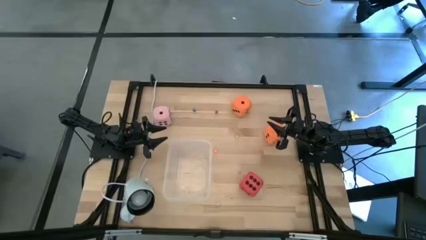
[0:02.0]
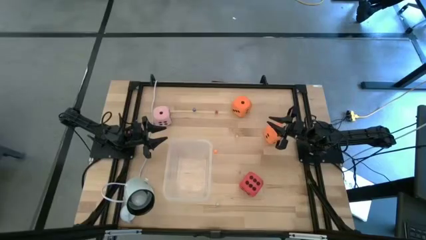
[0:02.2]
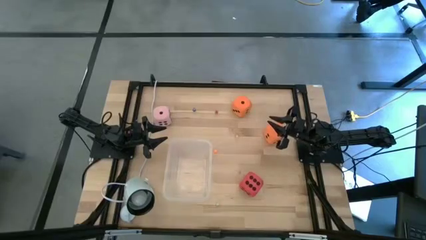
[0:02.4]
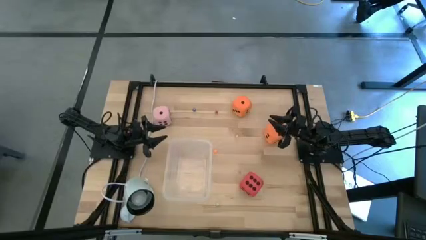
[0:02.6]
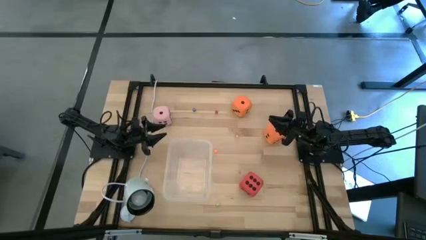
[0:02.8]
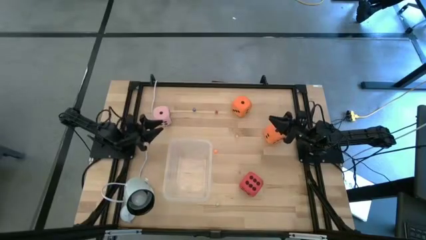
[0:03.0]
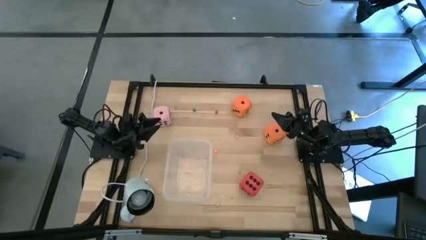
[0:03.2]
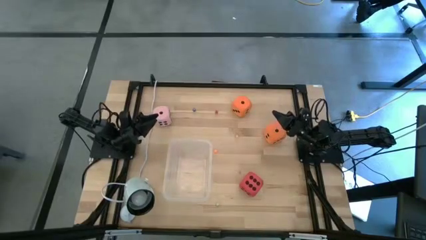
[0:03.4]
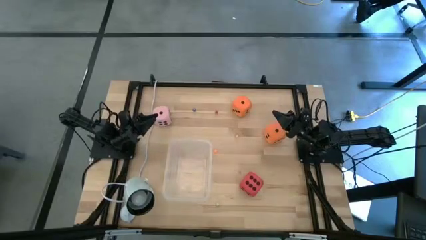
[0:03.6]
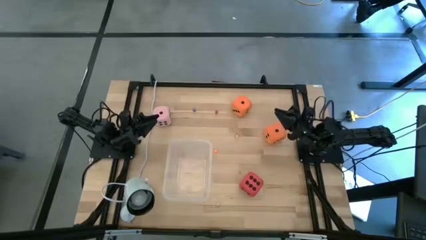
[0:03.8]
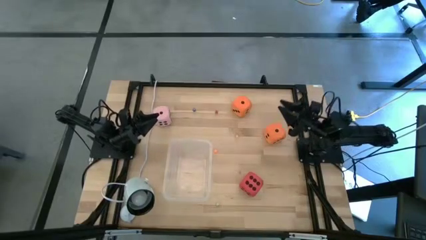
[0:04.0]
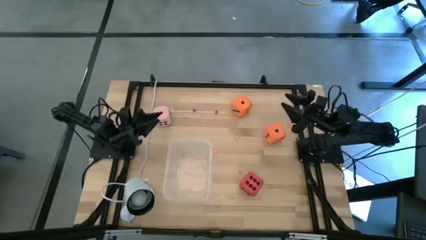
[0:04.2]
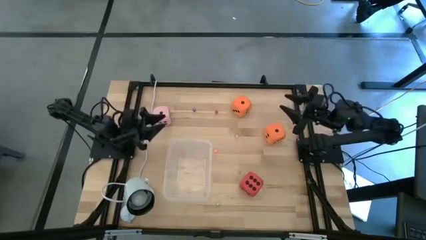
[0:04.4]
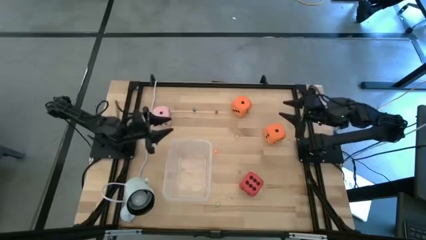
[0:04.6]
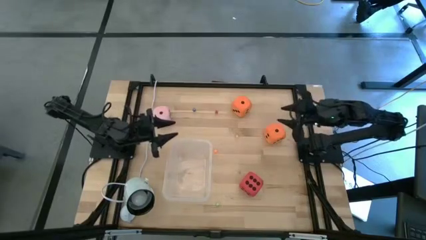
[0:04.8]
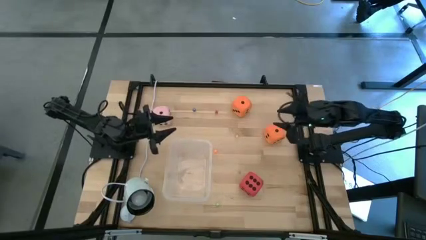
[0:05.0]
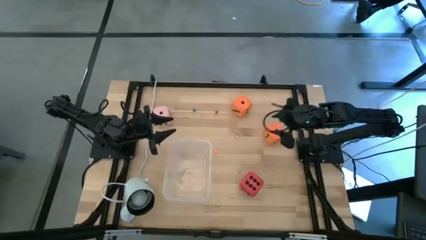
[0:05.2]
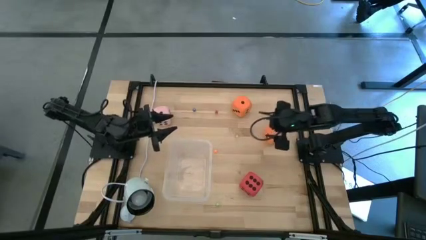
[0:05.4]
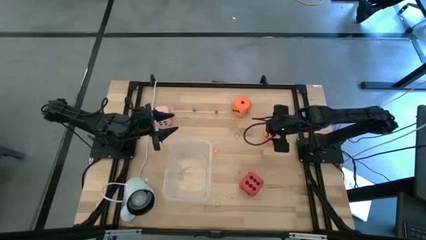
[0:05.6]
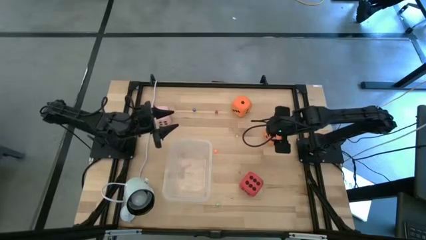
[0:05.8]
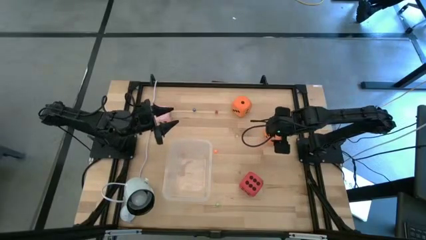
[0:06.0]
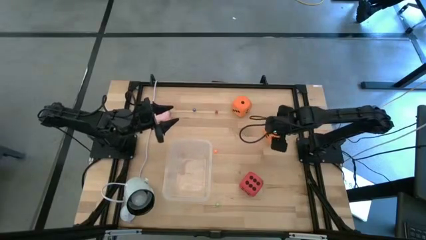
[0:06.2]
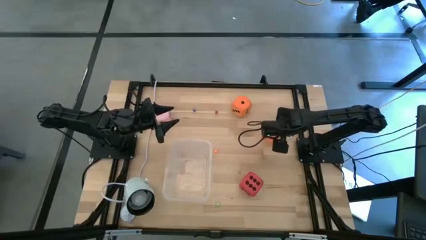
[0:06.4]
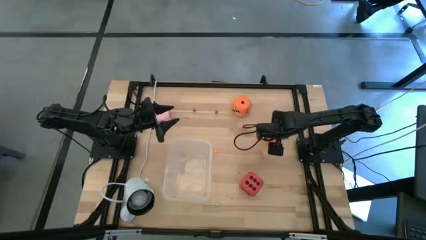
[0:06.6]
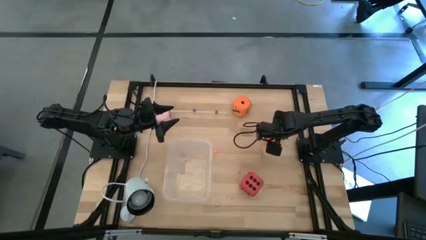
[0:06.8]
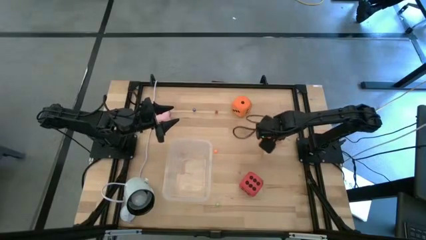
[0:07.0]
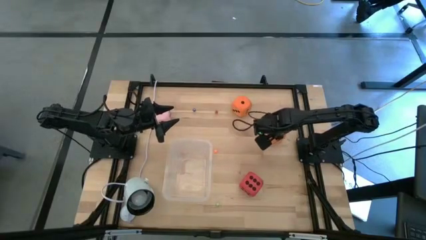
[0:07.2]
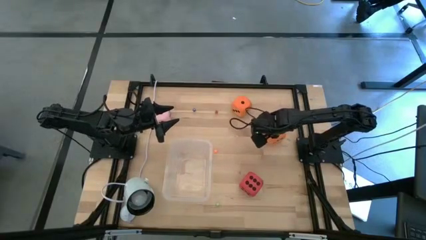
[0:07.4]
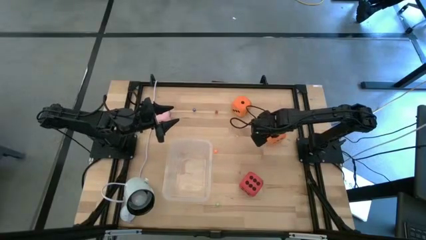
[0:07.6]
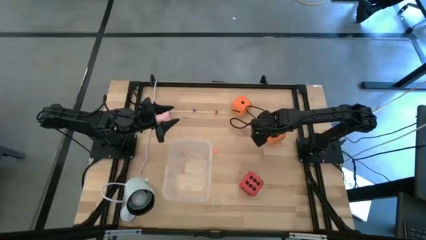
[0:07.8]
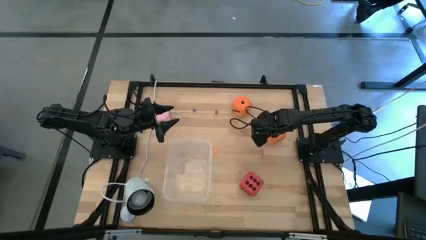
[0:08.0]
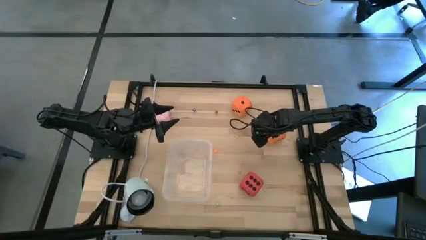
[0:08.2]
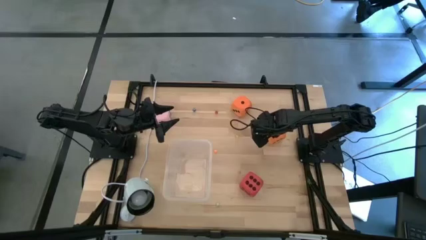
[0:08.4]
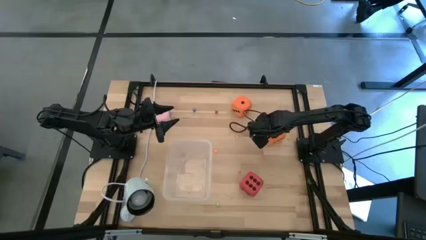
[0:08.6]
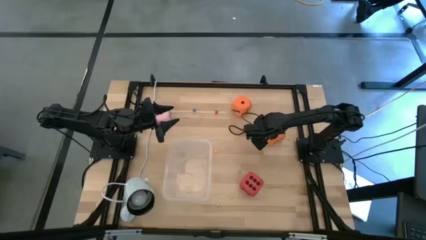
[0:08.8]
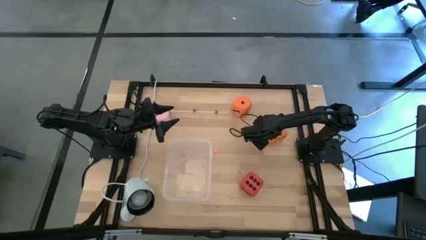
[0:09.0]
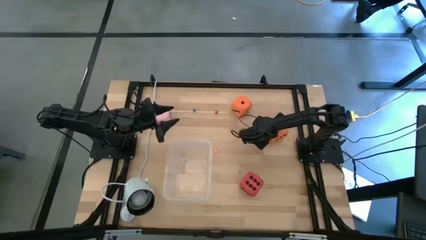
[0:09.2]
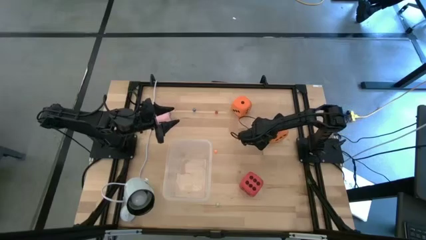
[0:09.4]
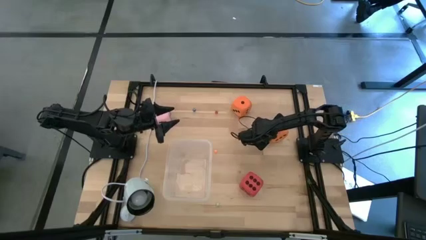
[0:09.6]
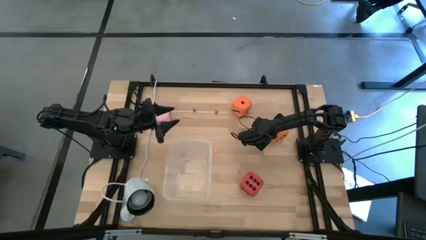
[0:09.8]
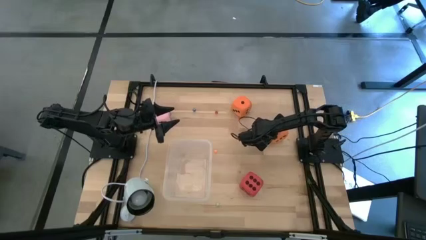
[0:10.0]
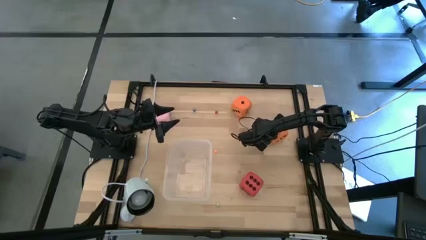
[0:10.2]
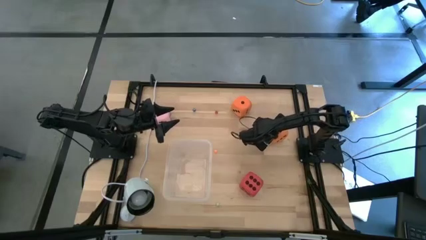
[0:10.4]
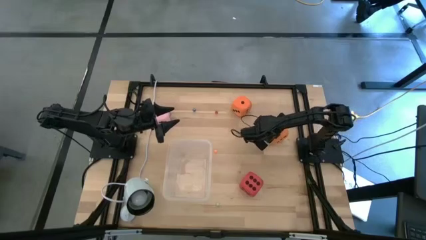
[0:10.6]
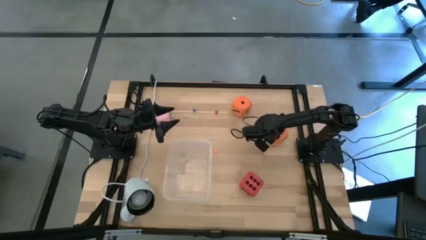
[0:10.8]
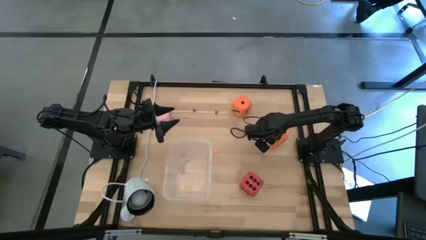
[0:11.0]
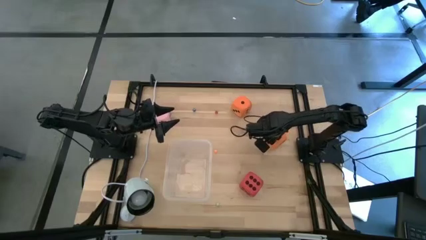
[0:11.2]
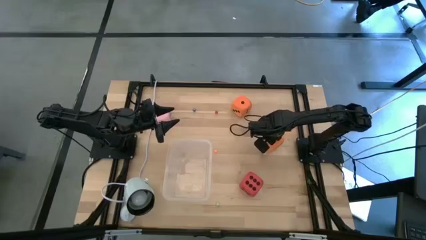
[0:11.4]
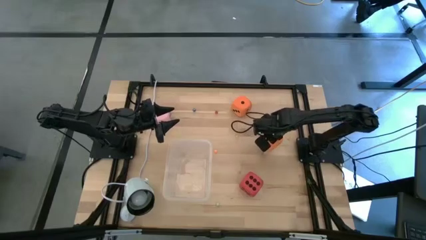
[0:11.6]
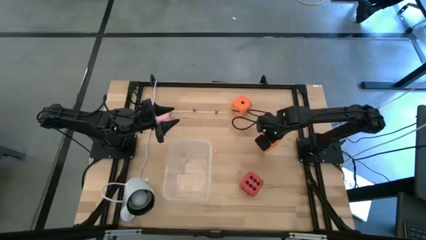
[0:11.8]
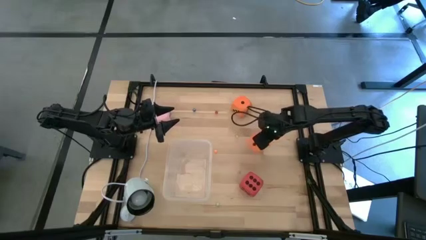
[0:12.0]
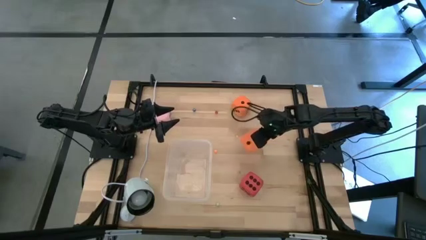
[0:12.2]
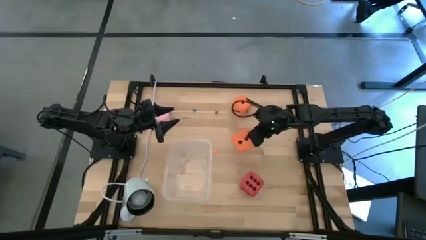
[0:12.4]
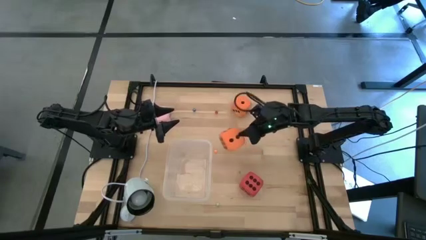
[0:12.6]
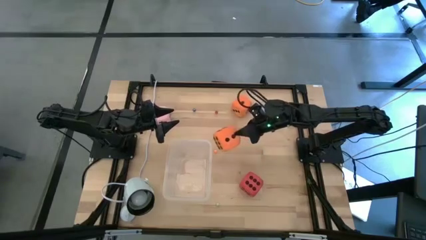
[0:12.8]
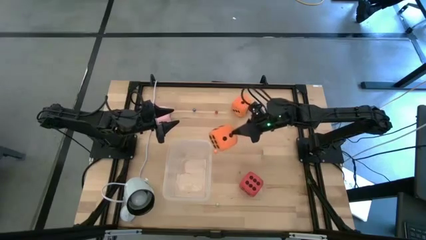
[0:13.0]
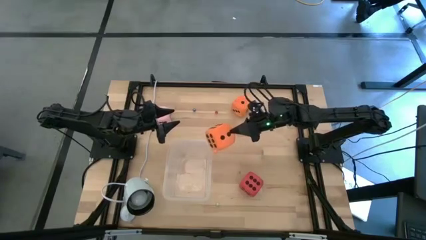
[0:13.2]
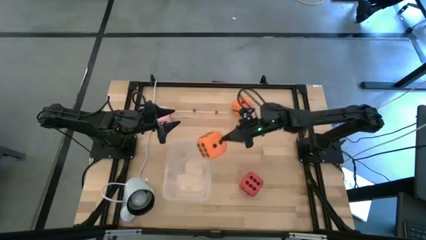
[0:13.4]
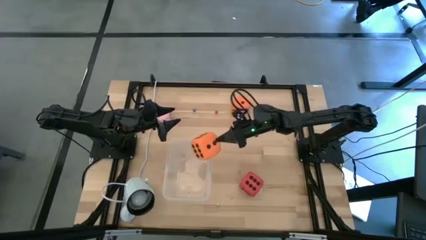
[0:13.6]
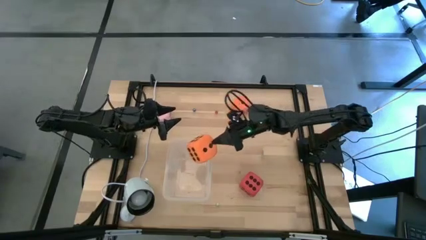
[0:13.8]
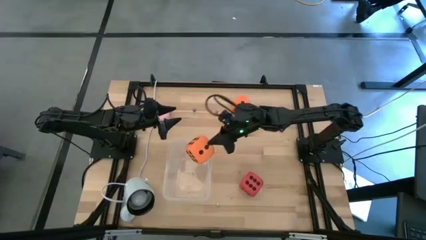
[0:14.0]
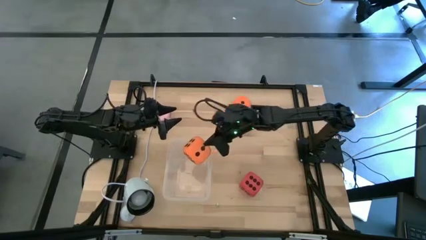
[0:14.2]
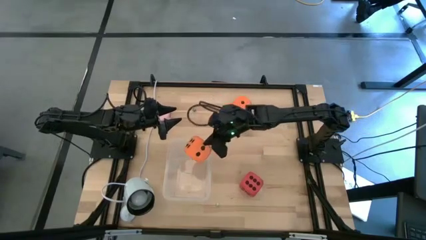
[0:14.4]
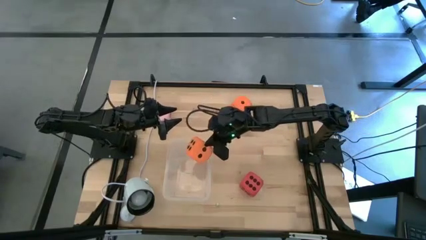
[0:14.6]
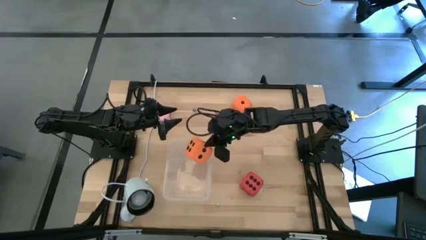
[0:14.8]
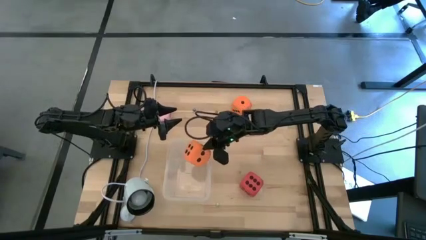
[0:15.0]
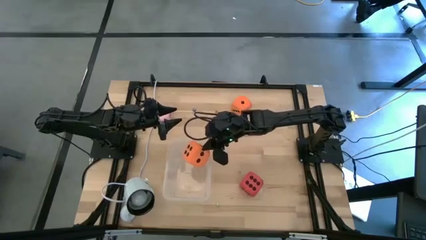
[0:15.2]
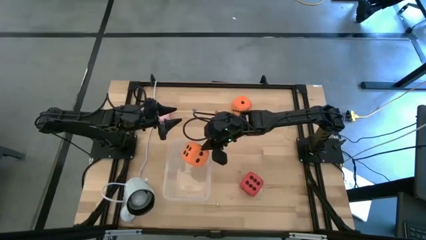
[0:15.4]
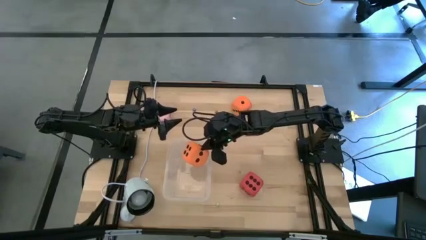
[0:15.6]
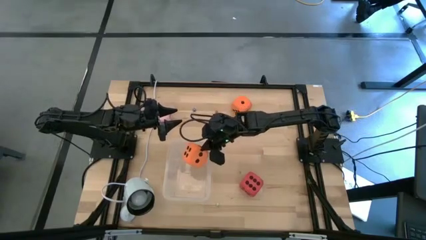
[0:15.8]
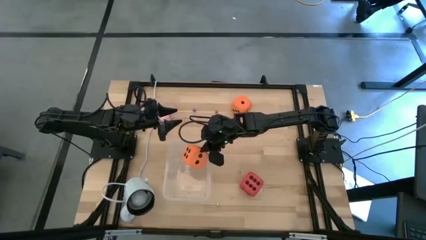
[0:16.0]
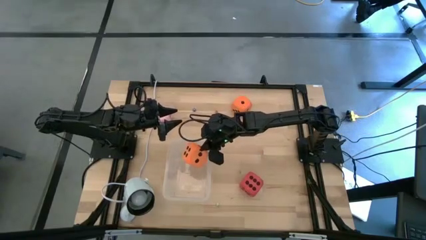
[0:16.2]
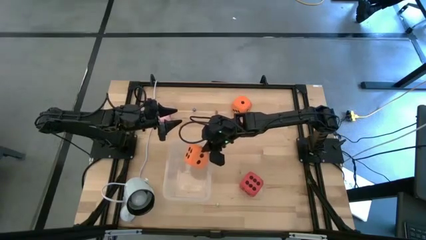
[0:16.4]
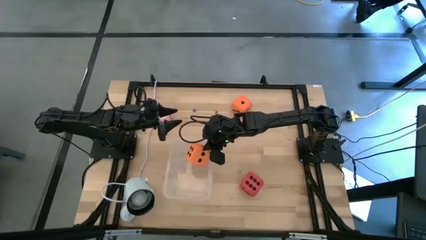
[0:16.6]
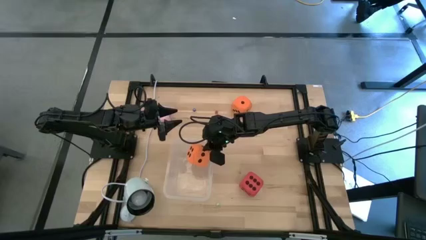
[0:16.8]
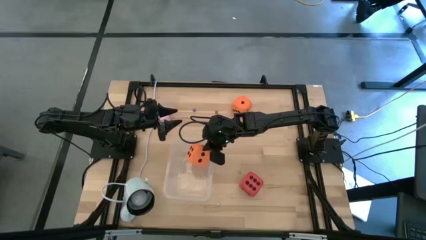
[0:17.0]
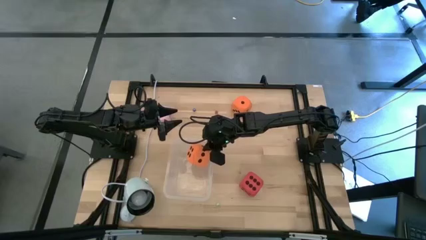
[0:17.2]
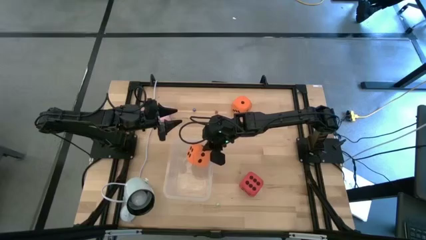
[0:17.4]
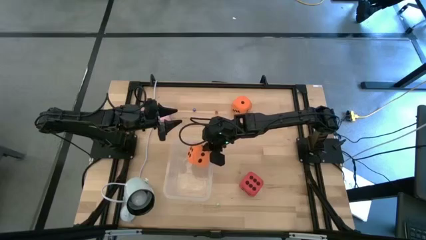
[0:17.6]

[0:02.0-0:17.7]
Task: Pick & Place Dice
Put the bottom large orange die in the bin
